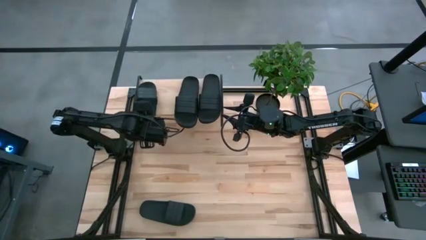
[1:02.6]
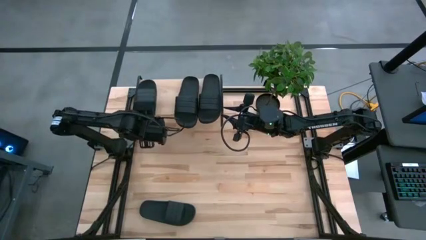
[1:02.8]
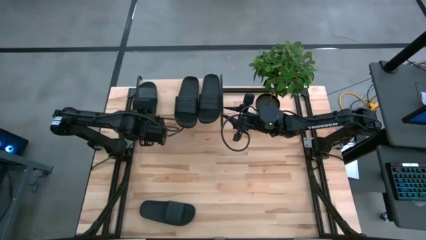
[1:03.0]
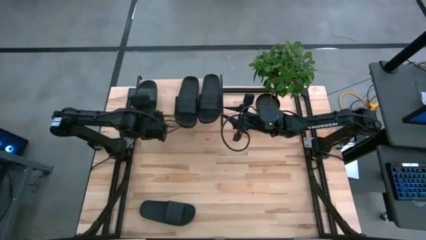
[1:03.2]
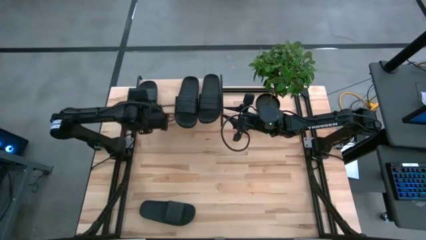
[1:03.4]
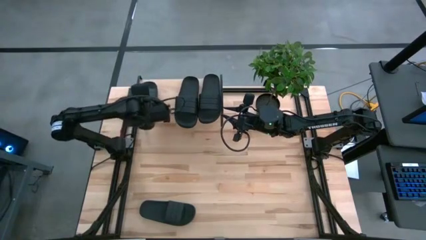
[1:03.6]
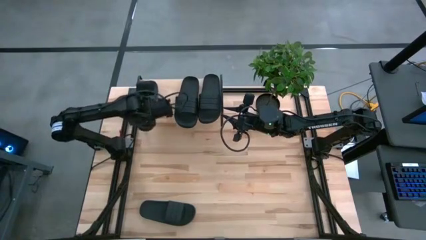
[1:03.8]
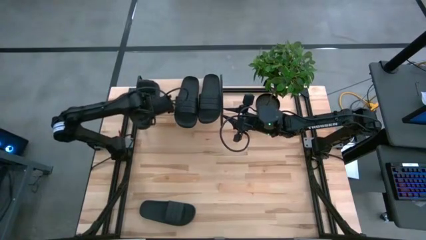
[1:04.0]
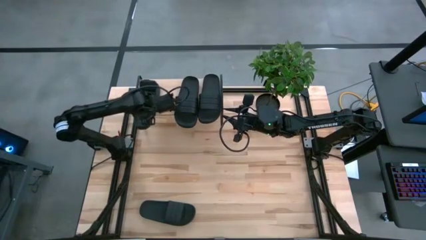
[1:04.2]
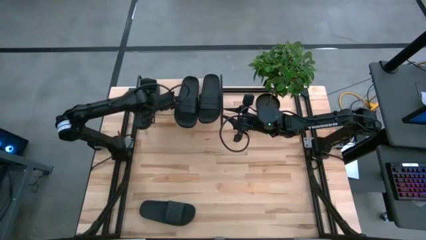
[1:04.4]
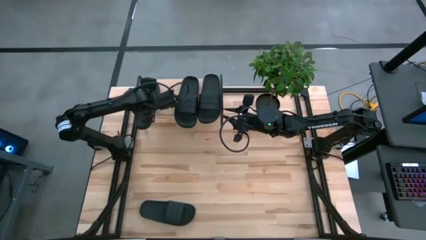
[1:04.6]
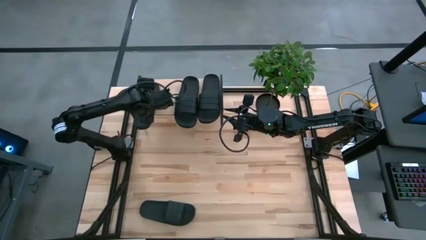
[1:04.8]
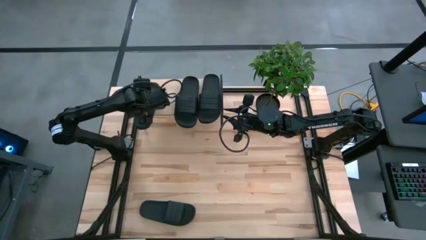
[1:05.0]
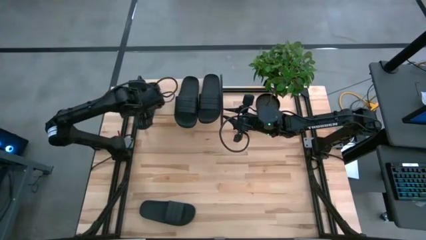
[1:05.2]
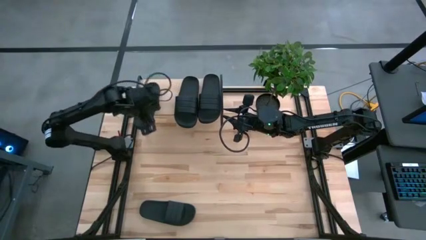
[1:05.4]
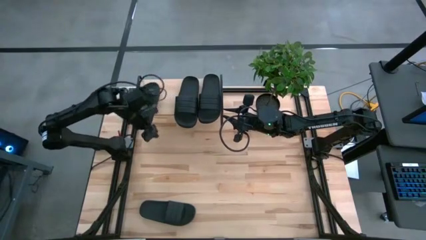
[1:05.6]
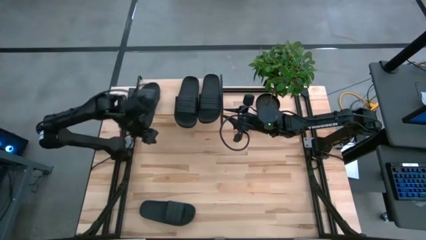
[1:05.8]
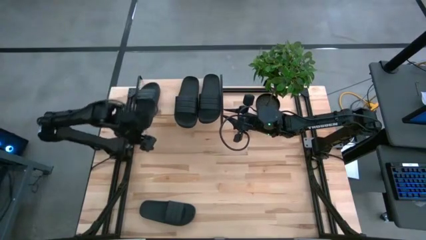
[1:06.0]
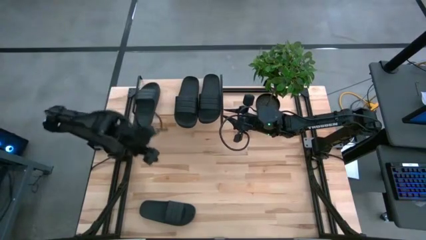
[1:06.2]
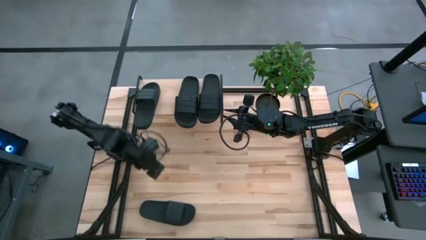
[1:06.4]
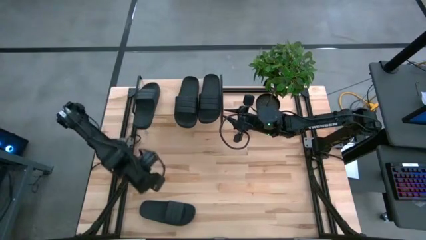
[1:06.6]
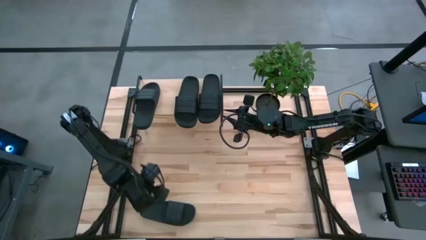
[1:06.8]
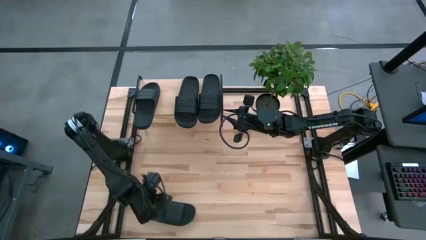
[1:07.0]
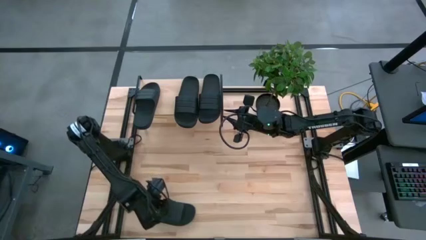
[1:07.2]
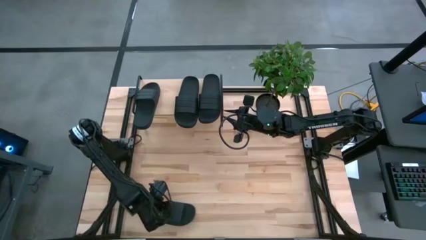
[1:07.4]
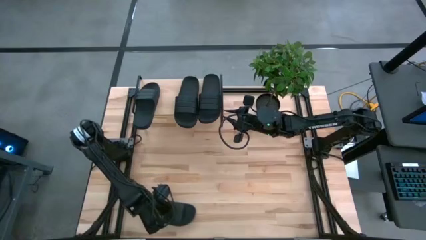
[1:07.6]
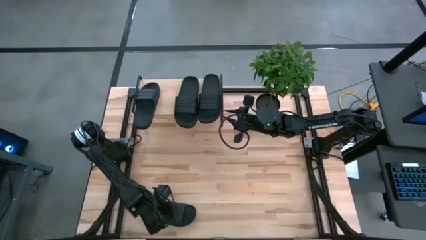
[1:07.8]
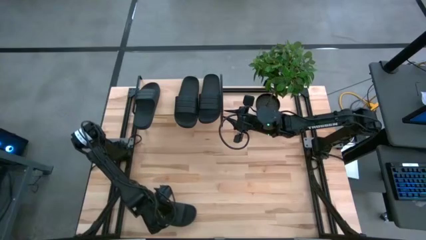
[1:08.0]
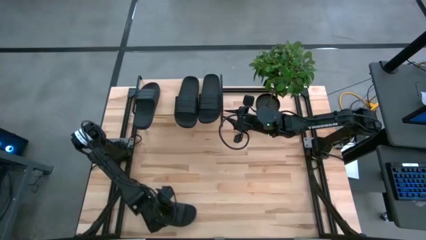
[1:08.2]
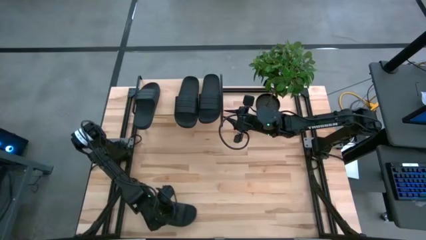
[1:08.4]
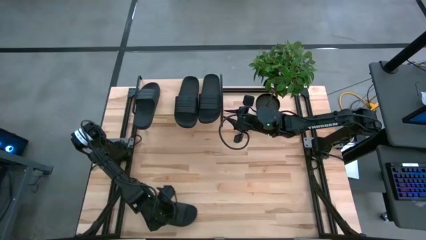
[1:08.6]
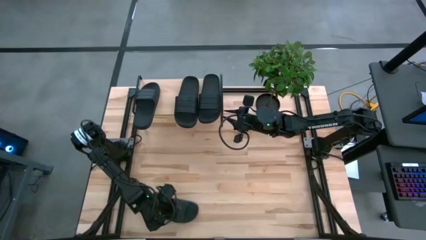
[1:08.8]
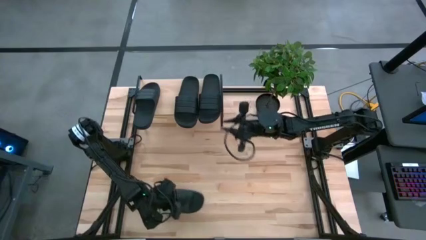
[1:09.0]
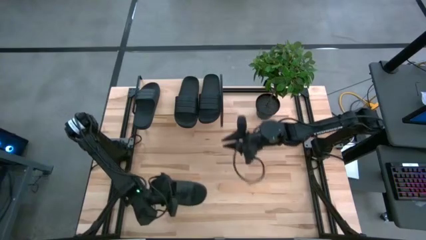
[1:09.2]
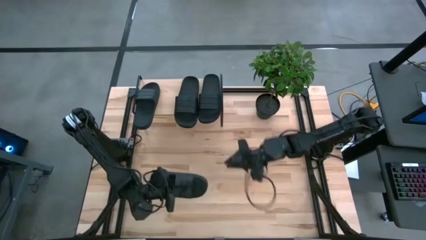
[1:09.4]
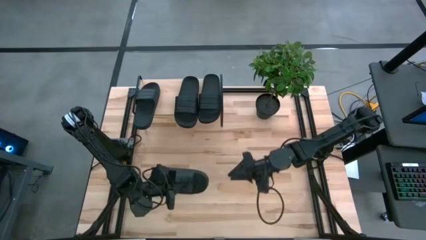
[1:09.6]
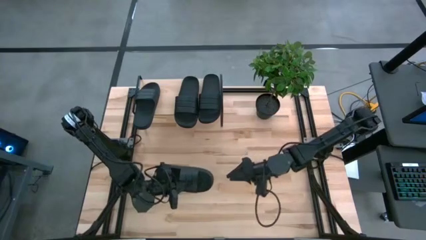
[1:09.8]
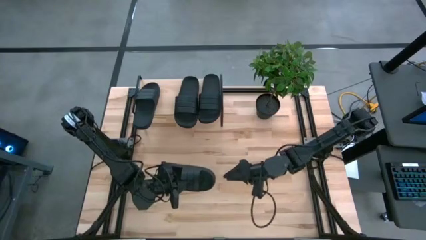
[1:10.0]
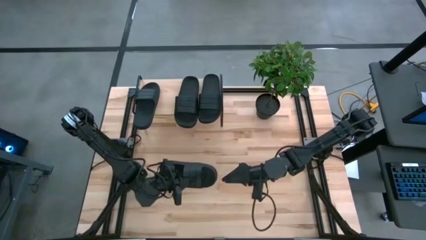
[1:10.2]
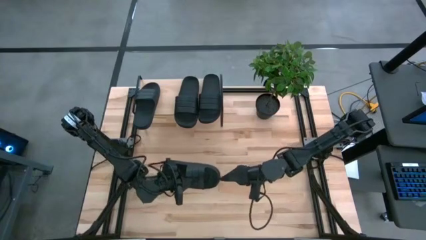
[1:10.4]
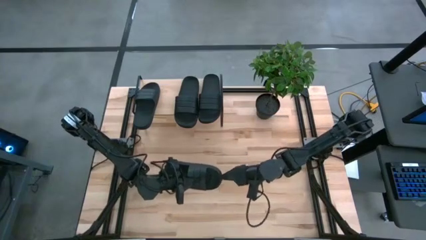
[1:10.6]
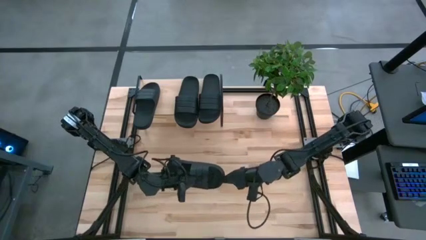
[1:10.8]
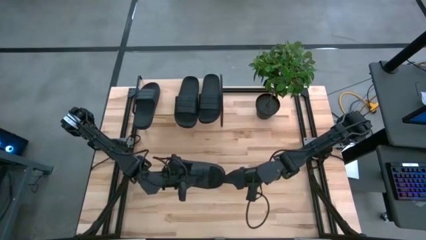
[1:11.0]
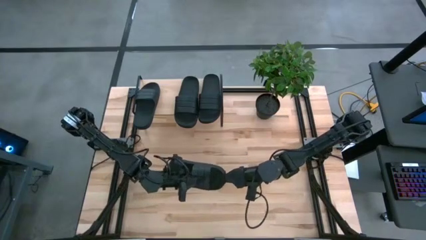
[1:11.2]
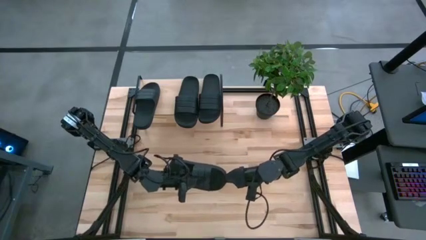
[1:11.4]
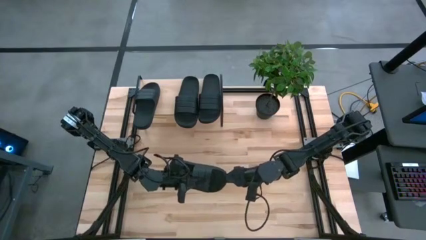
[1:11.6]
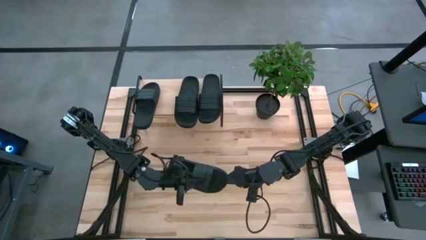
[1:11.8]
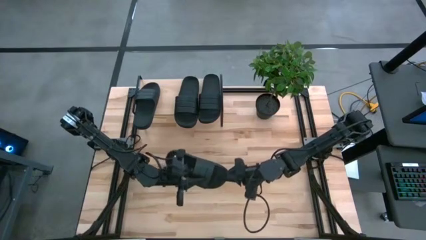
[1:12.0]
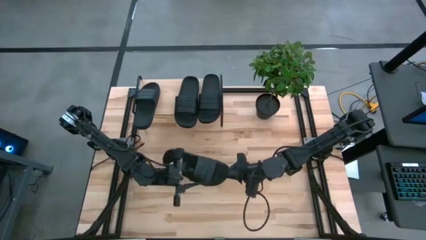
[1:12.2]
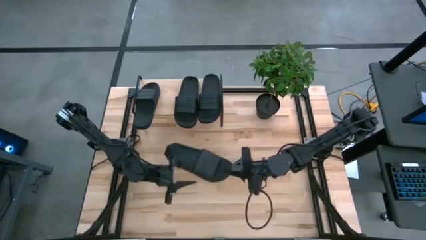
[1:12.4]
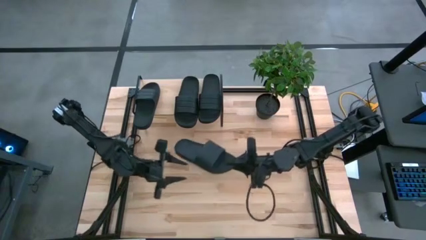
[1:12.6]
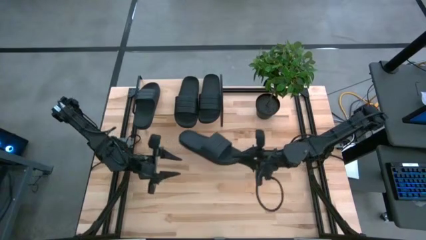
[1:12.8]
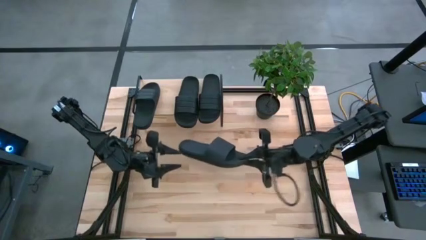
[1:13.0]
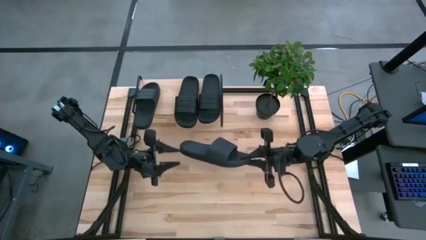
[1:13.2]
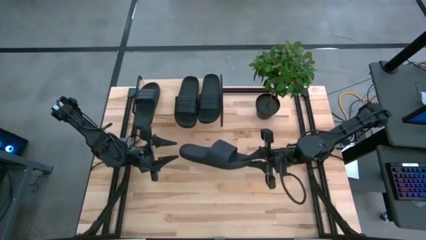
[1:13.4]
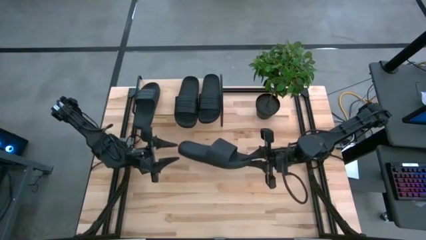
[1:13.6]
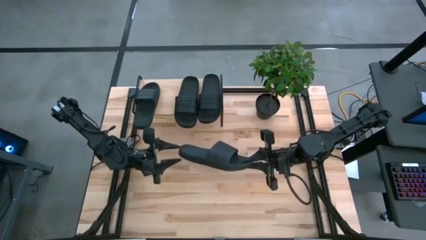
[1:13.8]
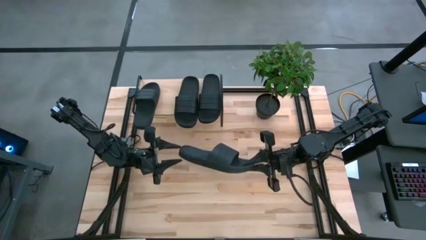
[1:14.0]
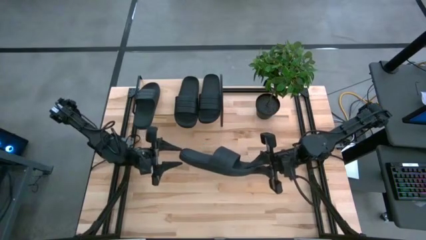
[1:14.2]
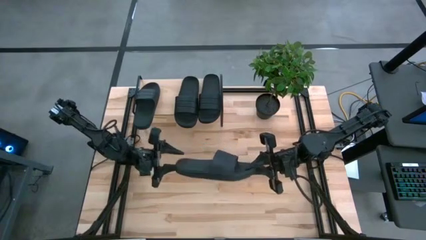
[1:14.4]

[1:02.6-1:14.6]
Task: Pick and place slides into the shelf
Put the black slipper on the shelf
